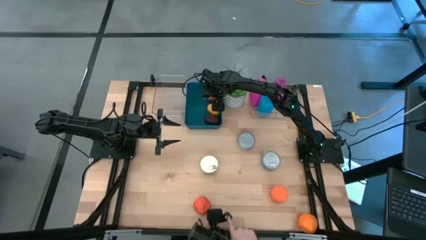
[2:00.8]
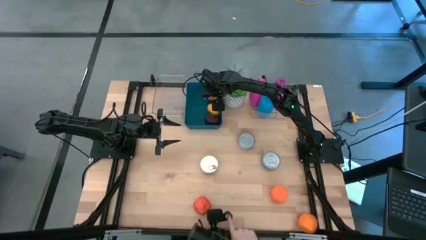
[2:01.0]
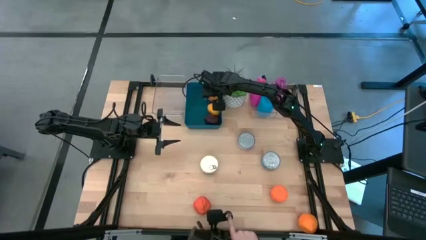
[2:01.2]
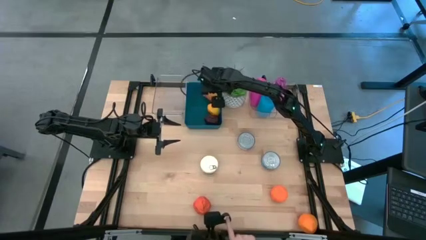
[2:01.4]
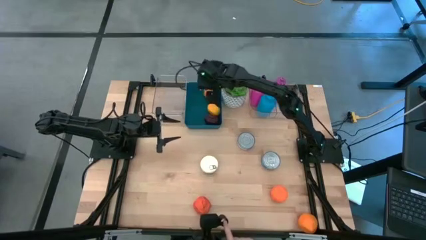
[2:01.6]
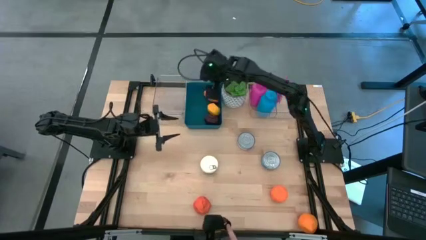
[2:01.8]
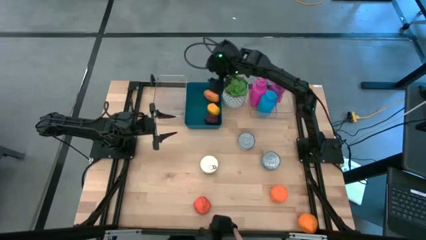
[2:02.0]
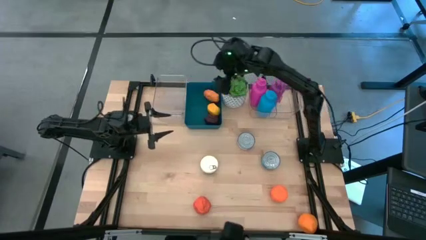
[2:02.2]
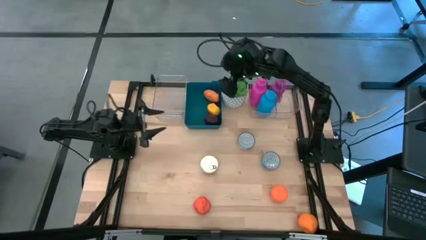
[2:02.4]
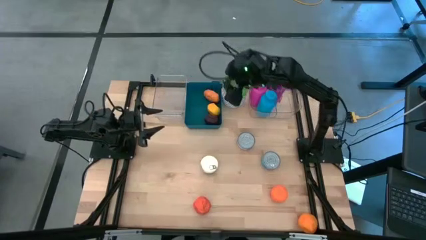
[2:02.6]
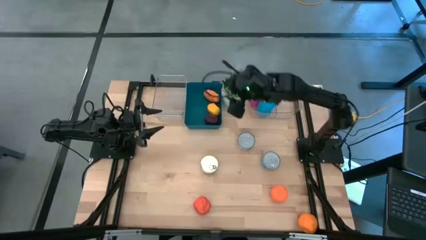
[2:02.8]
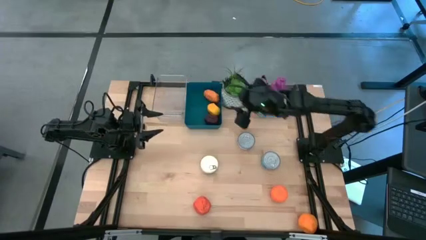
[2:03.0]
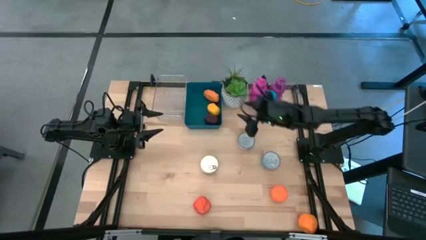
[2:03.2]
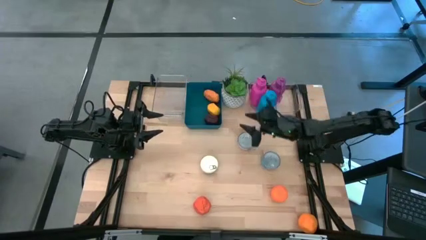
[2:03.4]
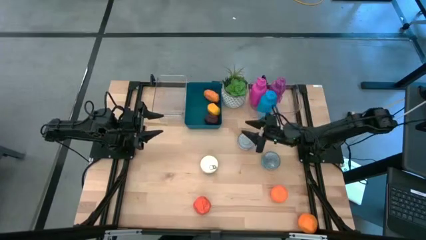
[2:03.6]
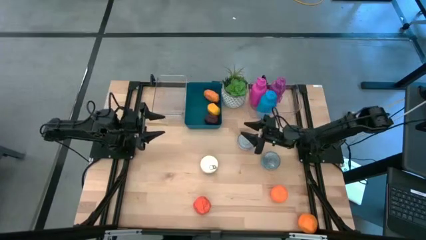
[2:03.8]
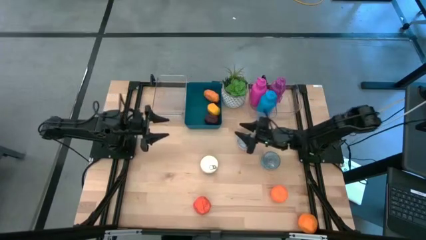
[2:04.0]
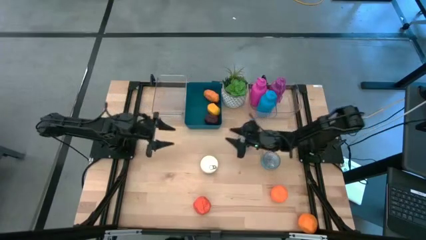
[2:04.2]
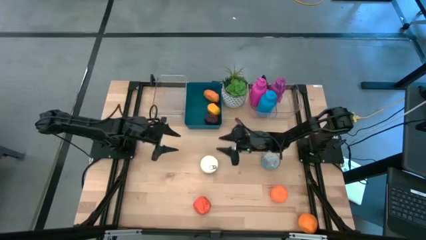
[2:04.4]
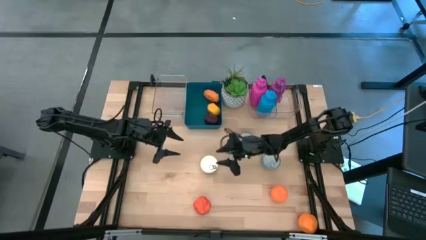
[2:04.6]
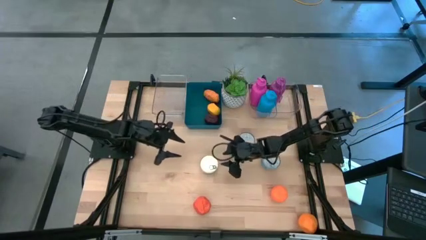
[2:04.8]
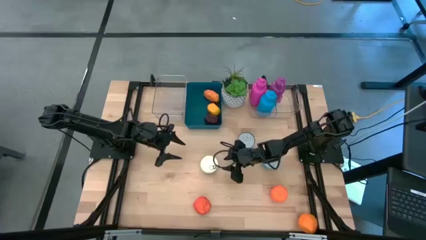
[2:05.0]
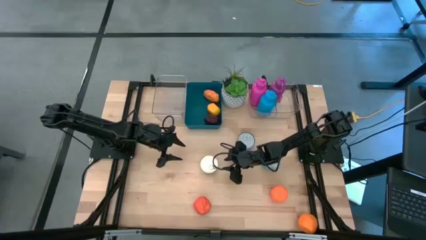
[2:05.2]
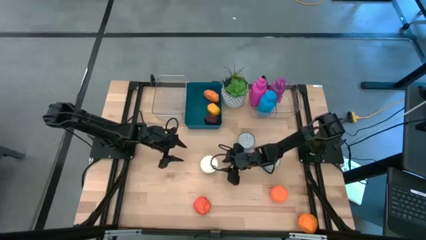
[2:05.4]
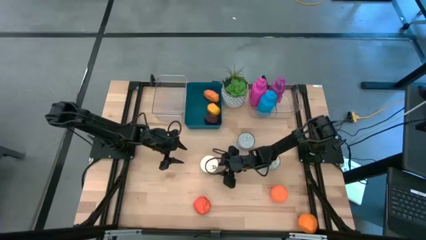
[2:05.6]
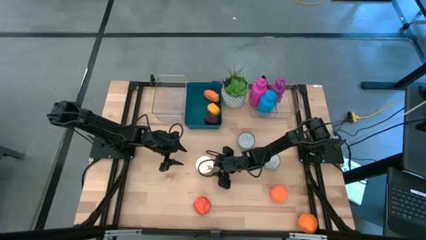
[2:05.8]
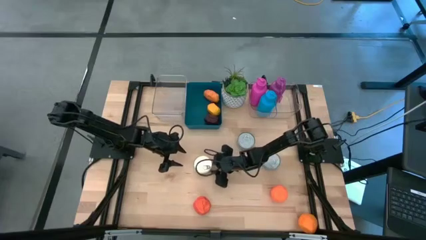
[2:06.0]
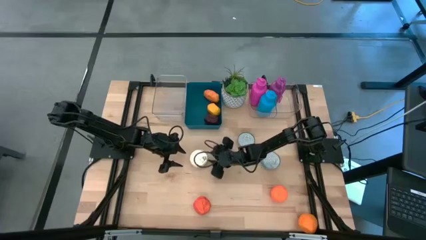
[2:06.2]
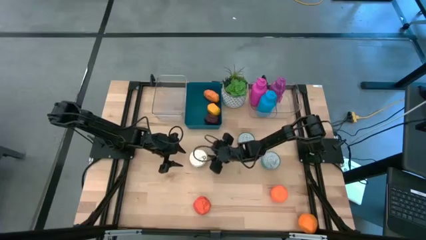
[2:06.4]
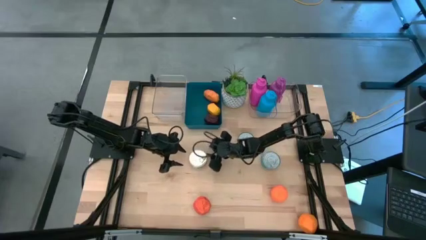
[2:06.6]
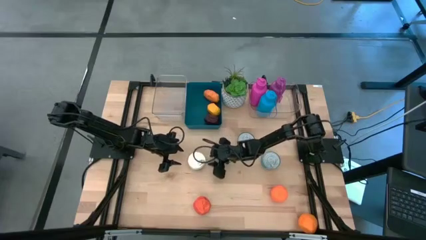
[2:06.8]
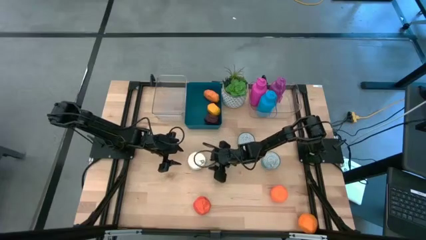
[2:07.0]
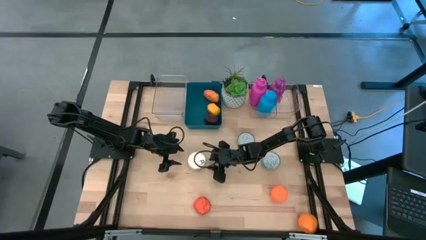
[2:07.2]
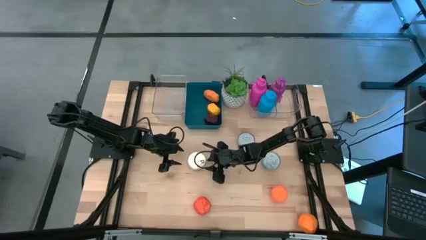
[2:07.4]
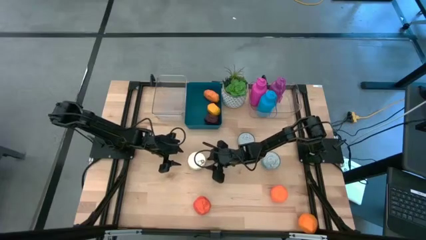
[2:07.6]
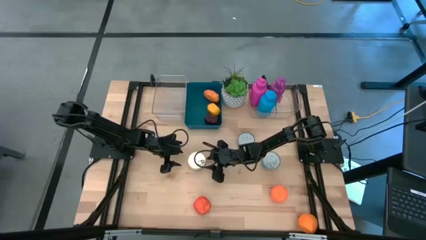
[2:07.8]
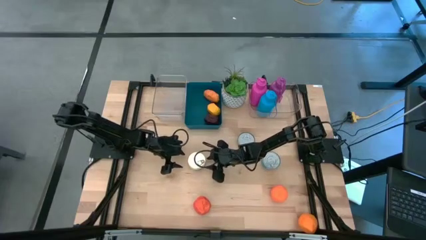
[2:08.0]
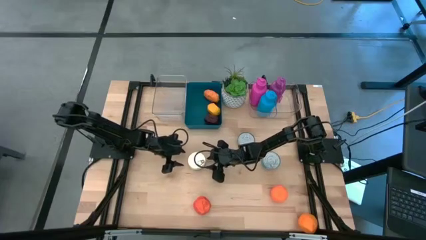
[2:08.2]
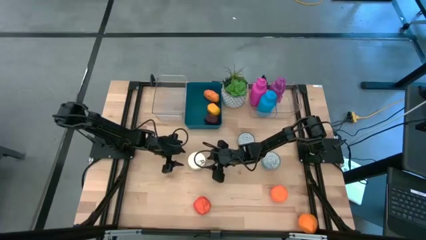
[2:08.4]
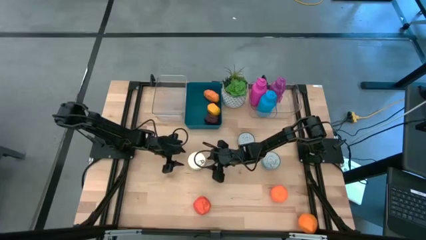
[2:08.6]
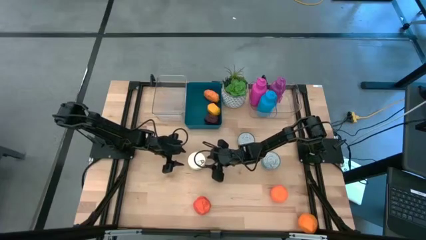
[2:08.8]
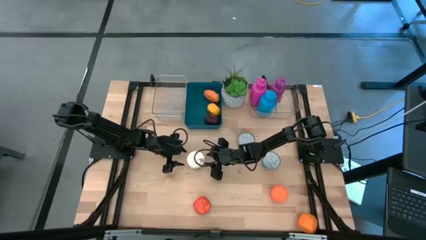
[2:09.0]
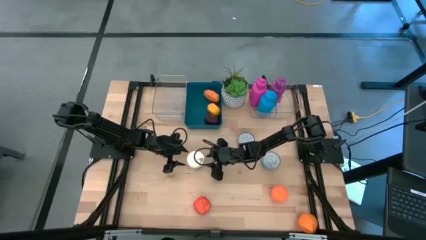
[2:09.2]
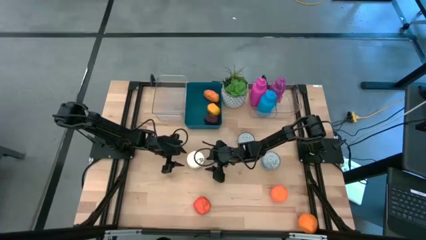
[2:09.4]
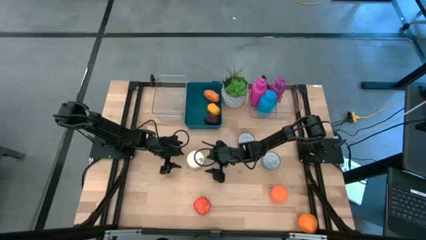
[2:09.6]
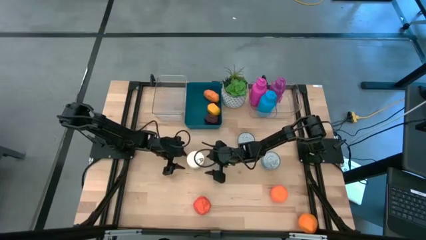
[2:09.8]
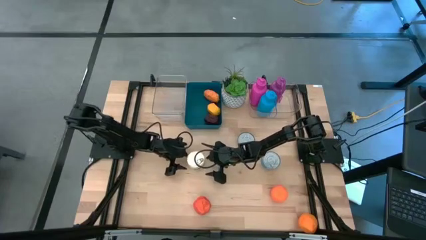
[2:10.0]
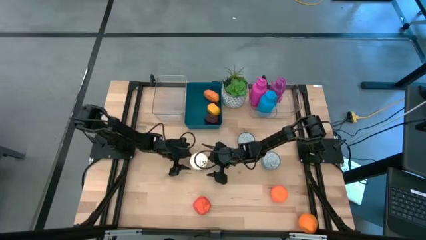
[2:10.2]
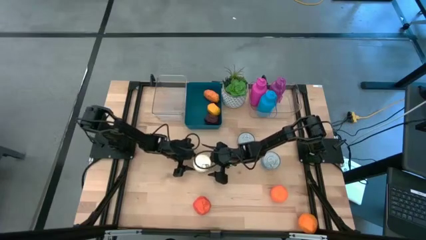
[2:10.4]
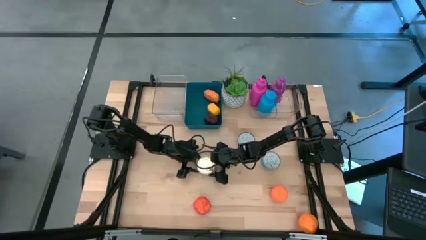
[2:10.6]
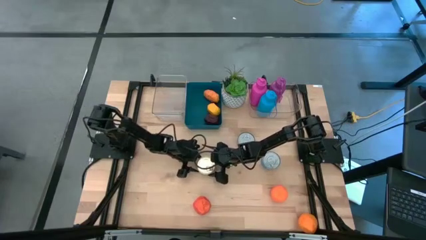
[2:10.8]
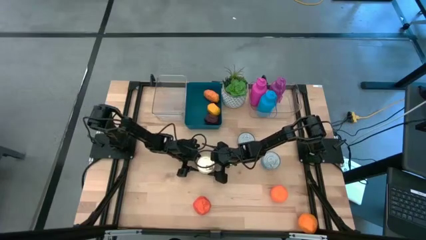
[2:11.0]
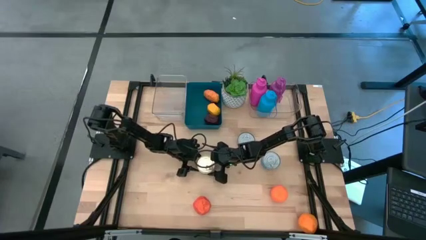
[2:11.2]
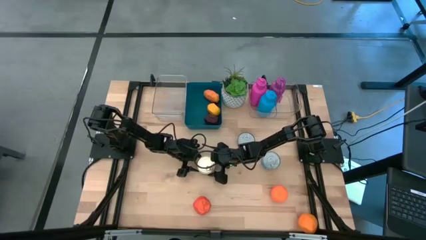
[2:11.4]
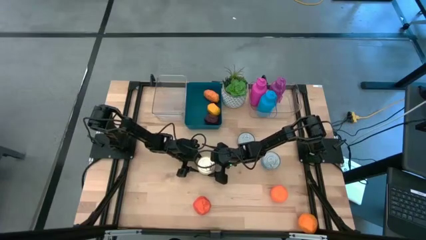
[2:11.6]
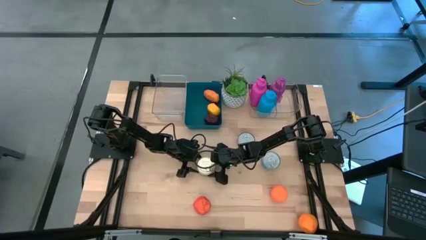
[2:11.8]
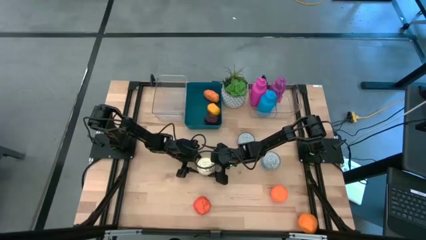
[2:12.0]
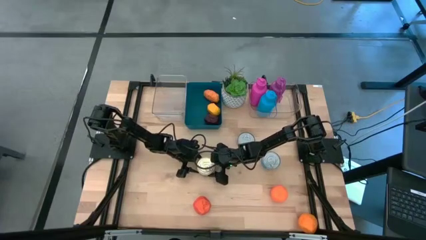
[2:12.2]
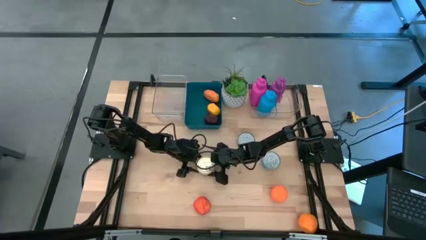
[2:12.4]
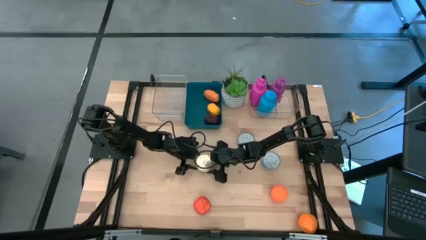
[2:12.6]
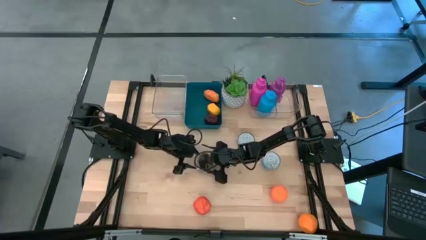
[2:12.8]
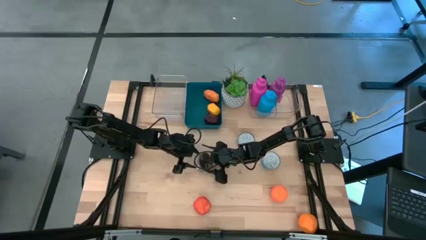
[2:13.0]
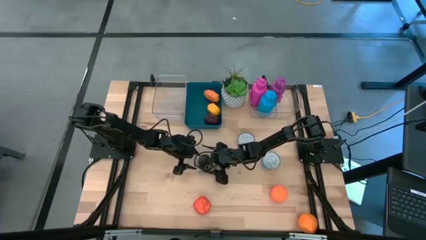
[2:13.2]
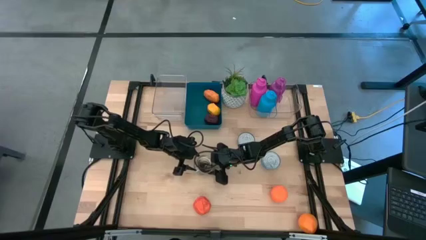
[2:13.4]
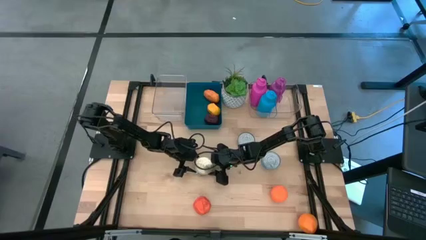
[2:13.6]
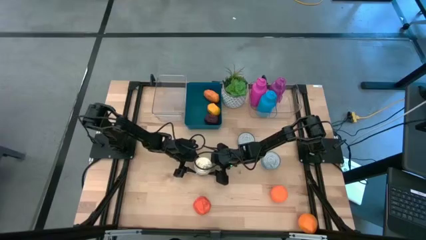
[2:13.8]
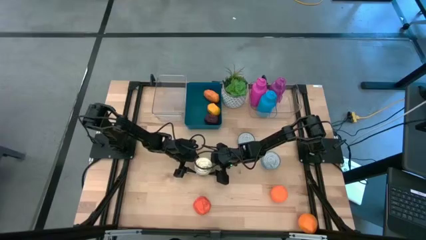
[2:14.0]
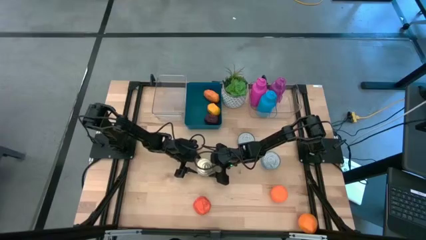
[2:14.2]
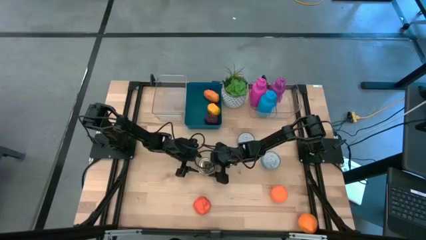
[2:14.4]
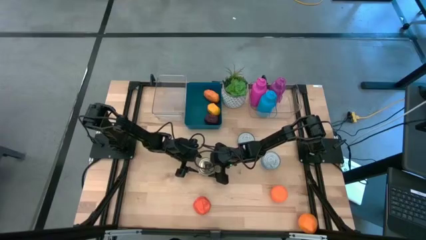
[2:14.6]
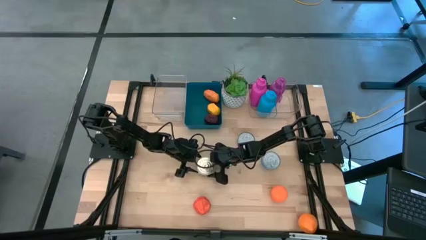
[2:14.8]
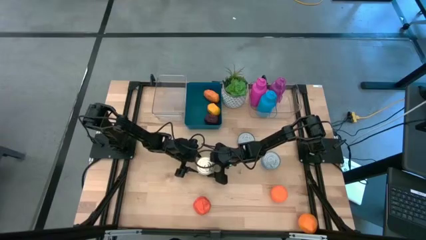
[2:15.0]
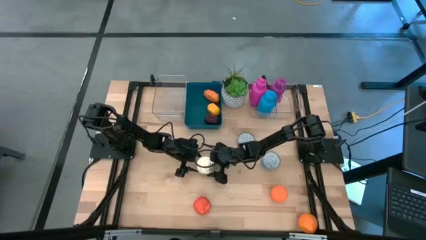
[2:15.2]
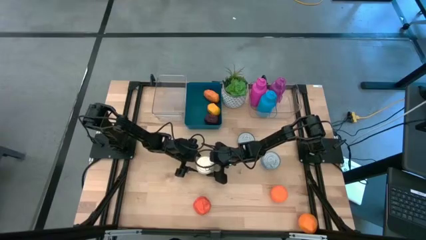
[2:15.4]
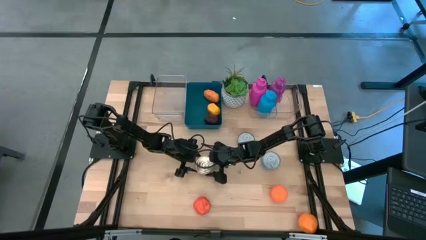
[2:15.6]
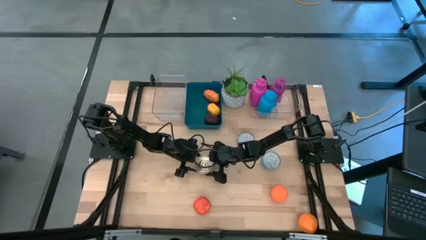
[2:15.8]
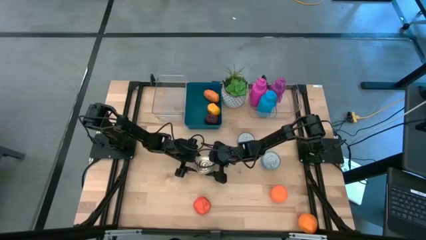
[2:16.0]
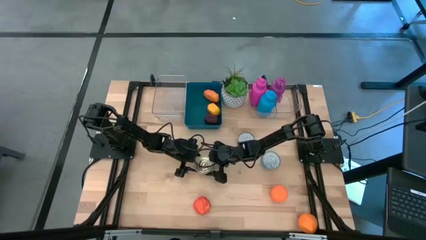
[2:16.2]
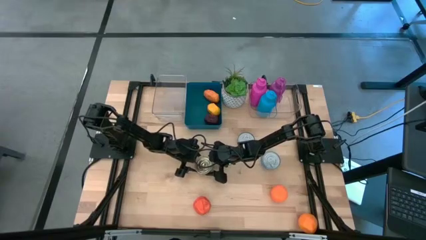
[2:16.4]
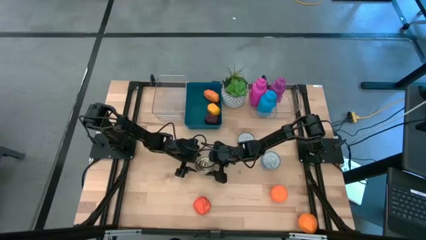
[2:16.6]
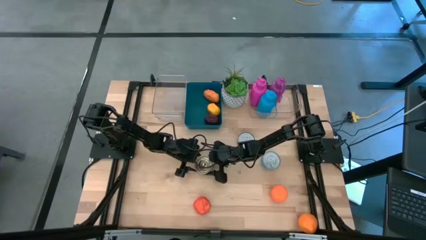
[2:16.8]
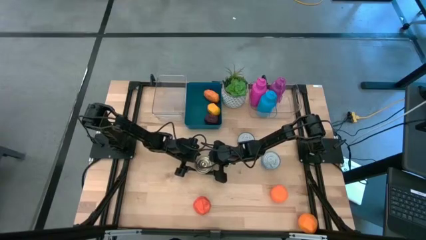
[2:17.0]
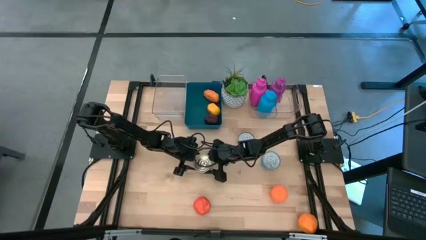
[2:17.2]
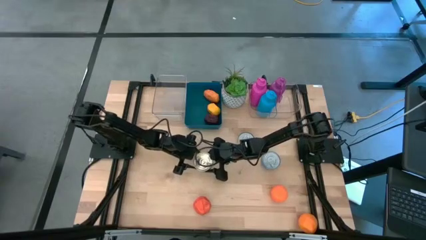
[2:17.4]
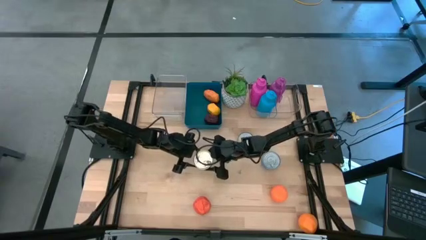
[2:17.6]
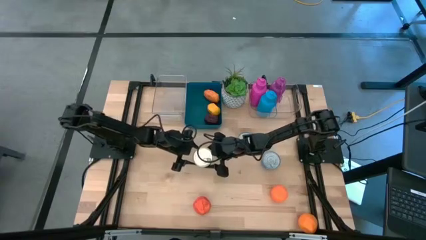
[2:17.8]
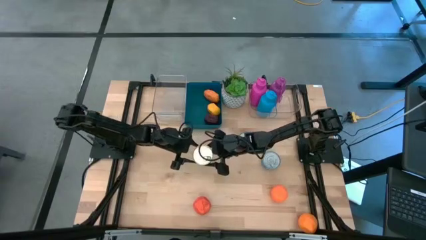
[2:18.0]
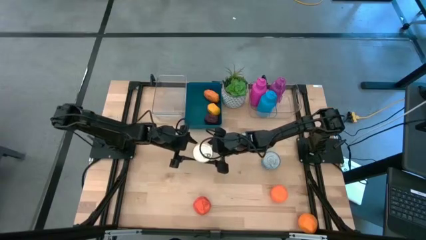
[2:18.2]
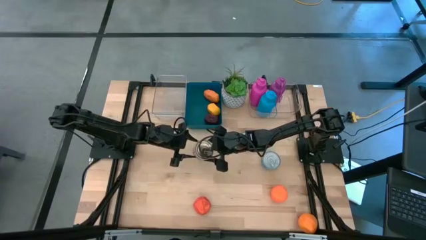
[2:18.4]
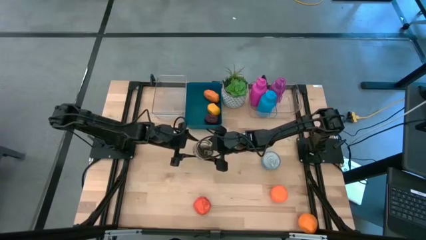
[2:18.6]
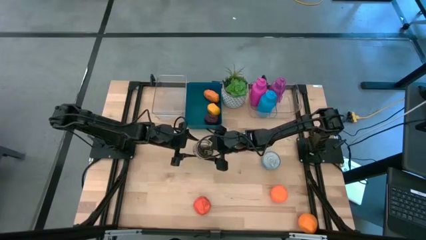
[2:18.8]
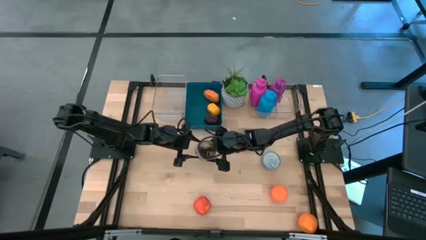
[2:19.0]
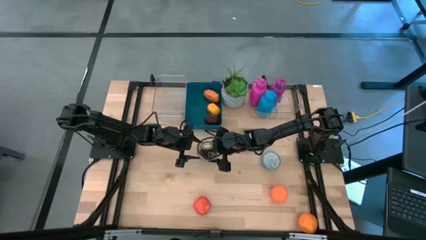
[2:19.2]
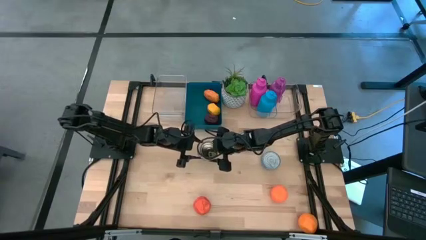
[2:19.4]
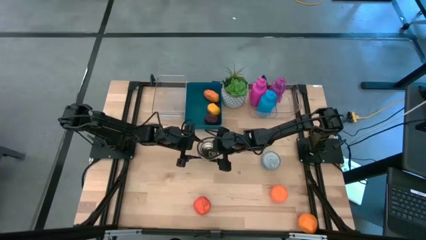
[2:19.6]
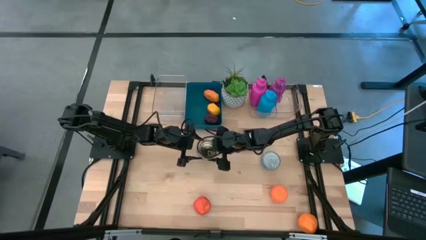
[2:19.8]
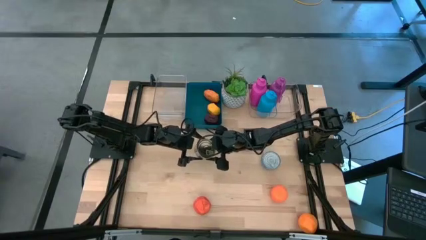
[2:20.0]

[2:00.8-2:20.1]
Task: Pick & Place Food Item
Put the blue tuna can into the left transparent bin
